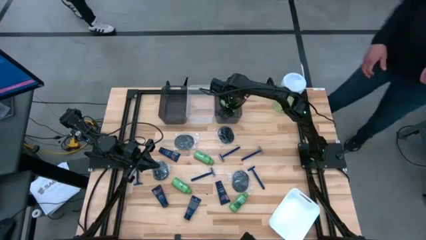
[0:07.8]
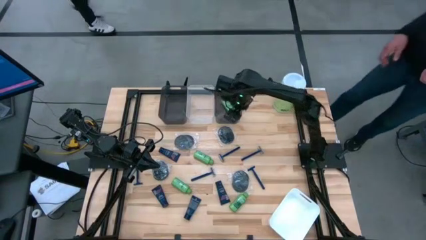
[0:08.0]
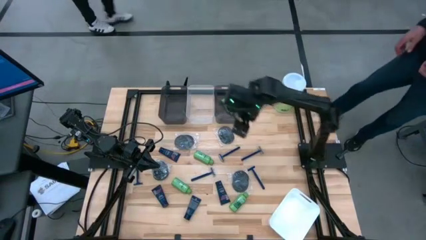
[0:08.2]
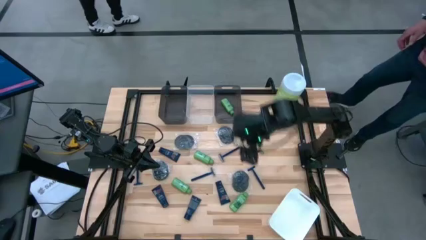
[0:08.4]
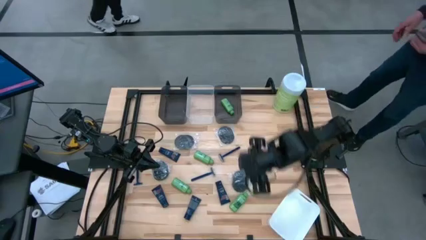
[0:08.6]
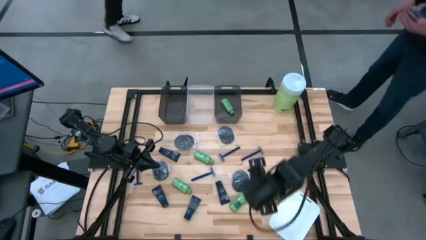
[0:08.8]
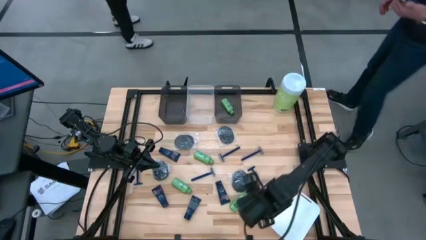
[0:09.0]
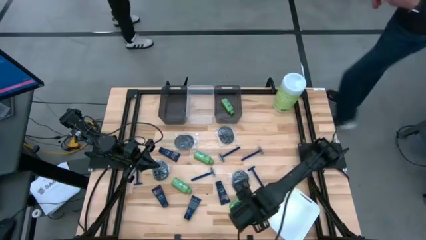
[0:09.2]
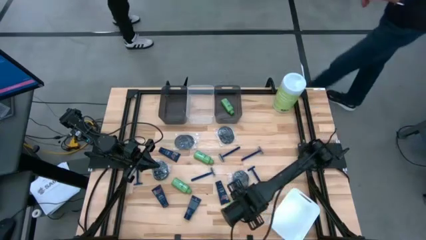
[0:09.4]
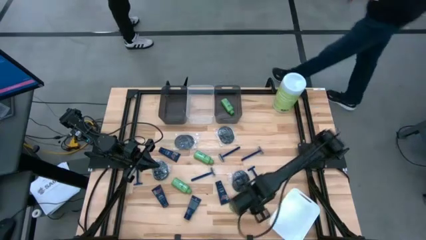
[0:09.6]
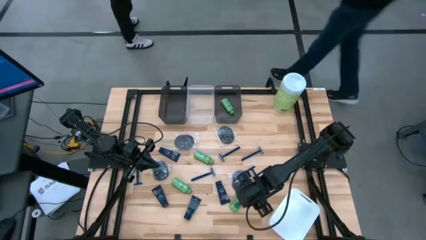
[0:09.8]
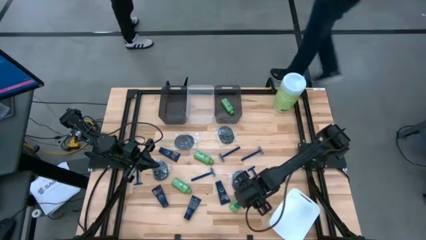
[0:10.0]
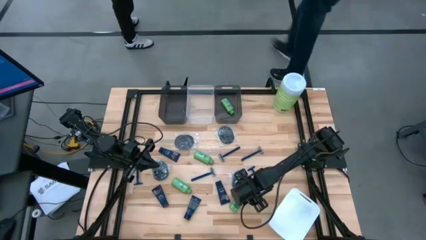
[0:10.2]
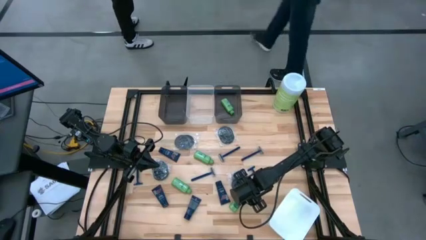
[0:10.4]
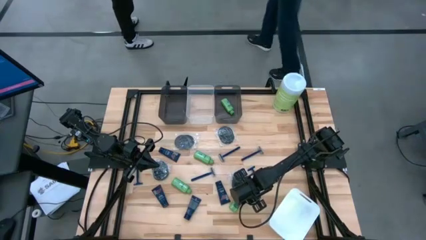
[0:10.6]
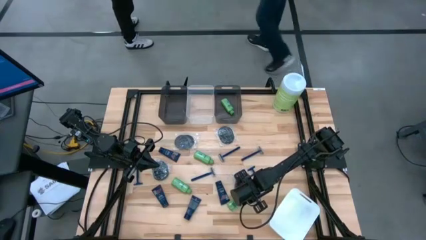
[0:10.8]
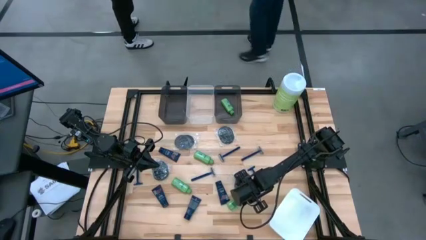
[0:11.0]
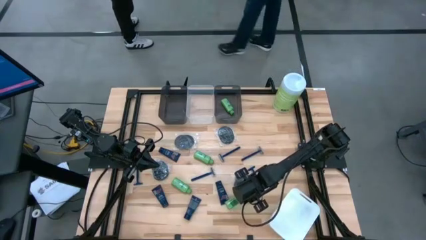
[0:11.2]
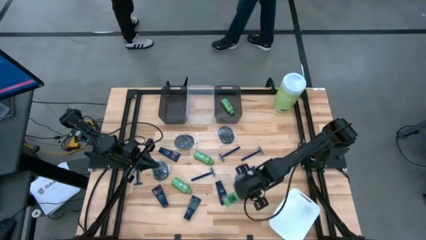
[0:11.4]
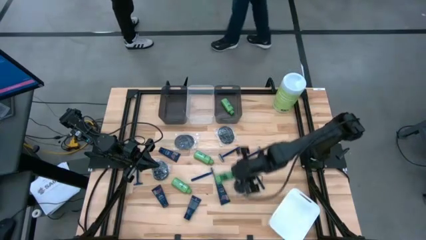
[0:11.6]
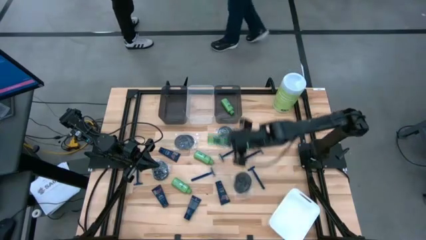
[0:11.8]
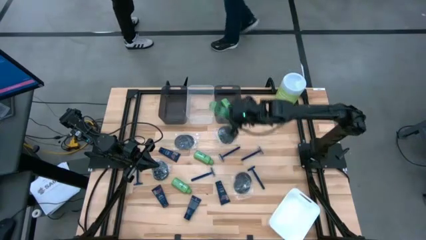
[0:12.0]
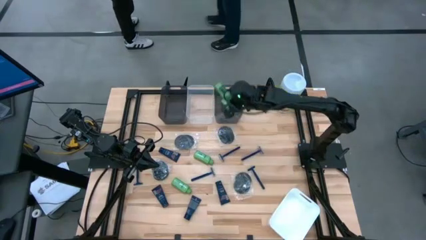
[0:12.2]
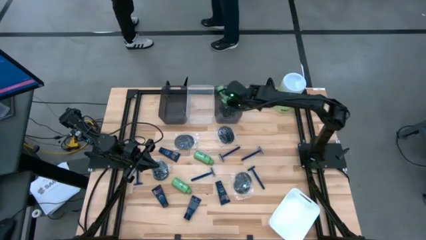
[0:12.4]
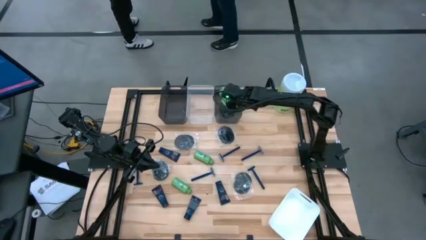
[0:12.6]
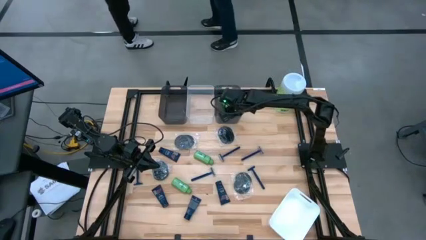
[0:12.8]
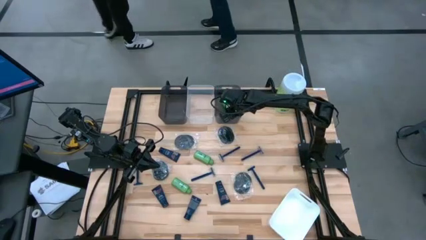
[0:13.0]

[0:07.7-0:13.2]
Task: Pick & Place Travel size toiletries
Put the green shampoo bottle into the right black bin

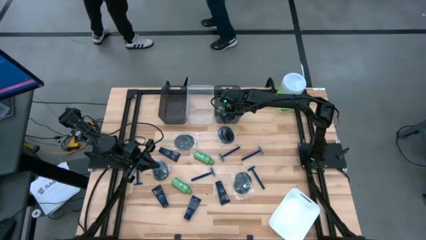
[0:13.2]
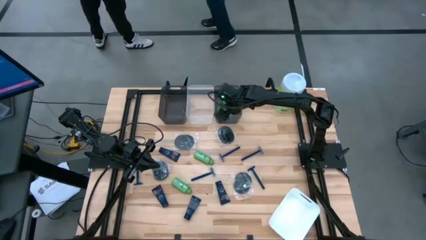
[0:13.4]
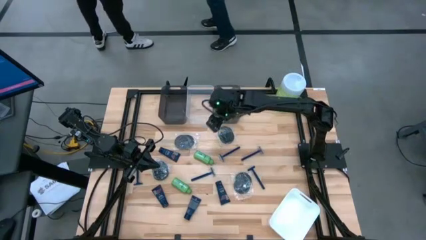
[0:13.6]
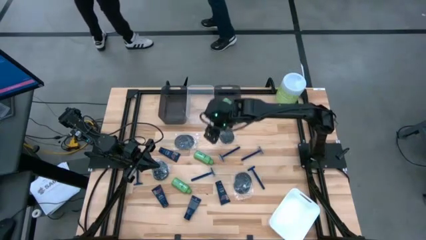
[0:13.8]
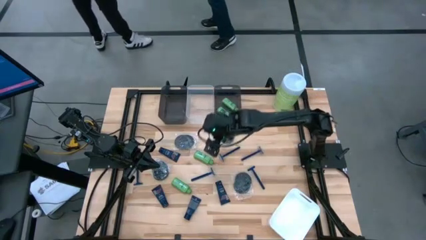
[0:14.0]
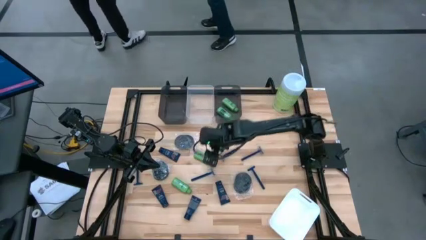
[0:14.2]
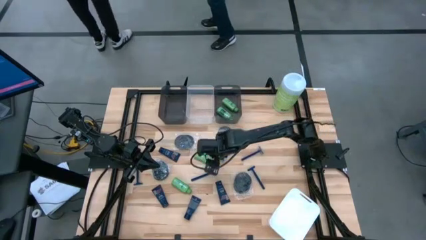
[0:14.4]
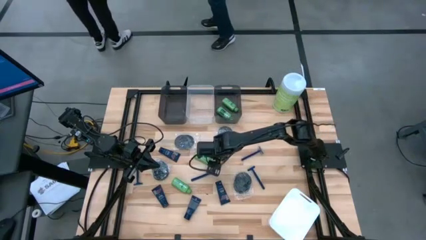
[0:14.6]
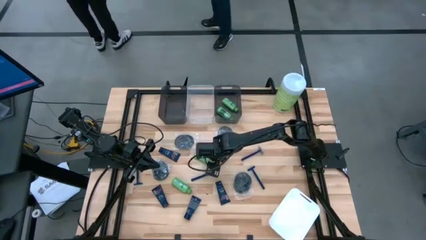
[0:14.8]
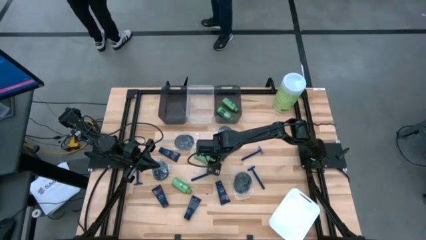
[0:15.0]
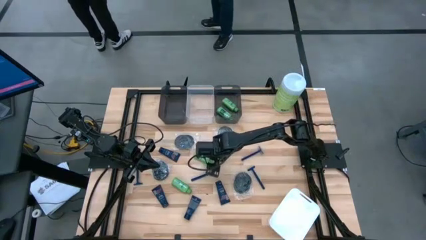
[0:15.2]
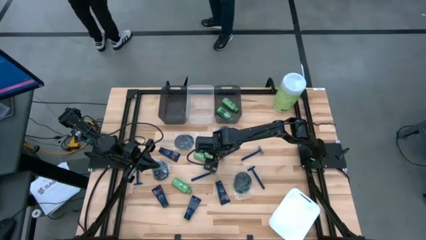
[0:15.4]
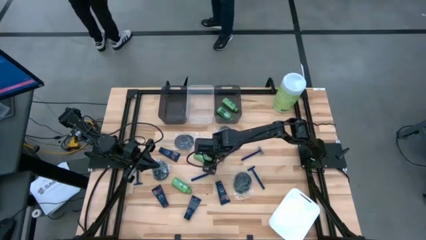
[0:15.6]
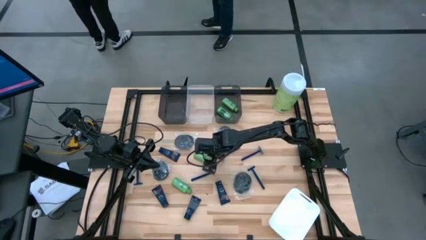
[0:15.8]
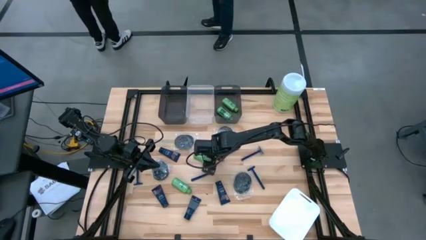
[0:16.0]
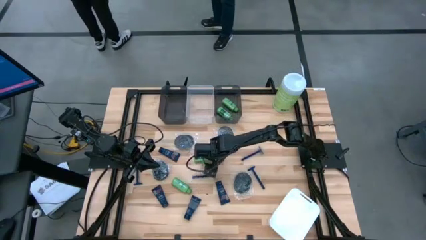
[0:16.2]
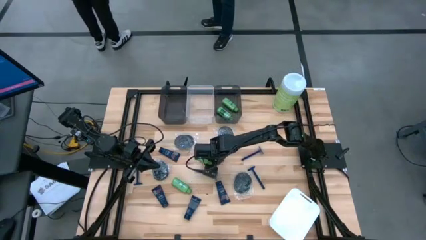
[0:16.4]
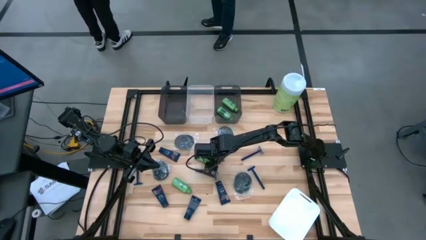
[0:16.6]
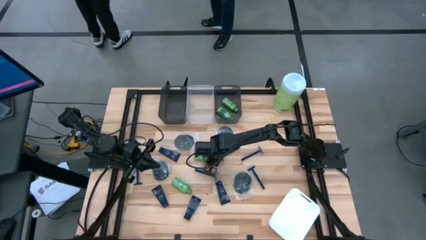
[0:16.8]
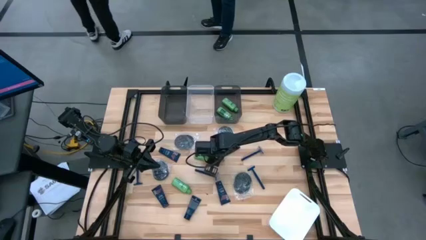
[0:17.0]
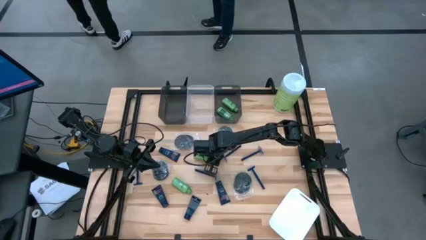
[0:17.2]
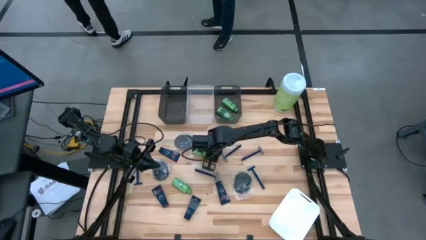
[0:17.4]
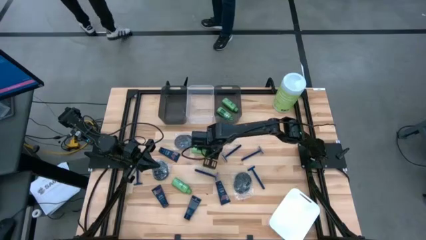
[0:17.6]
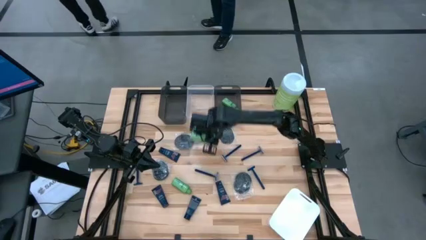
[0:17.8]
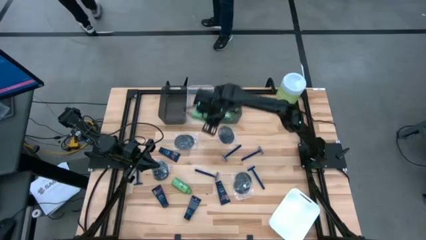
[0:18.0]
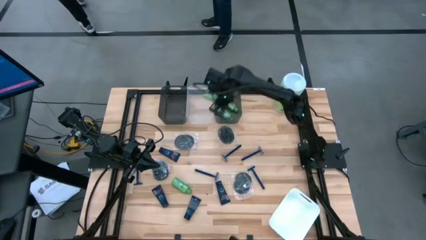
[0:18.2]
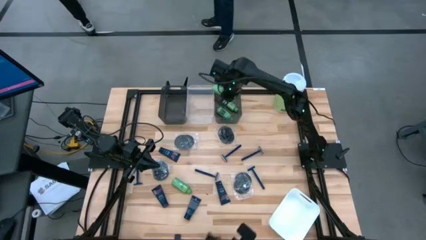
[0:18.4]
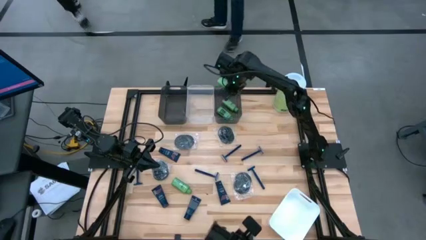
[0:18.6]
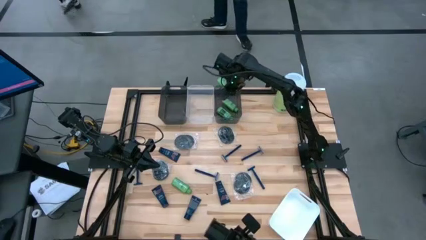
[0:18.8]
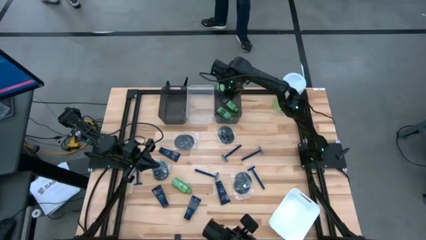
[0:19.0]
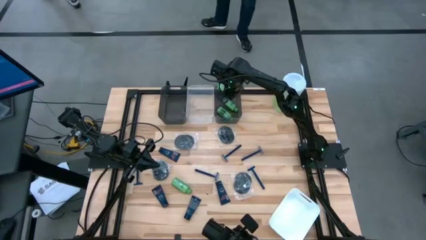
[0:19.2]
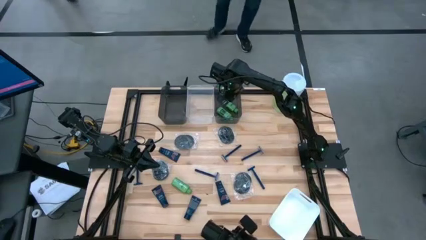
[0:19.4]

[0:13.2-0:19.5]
Put the green shampoo bottle into the right black bin

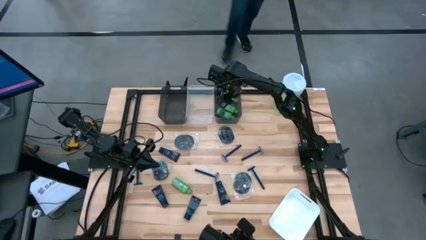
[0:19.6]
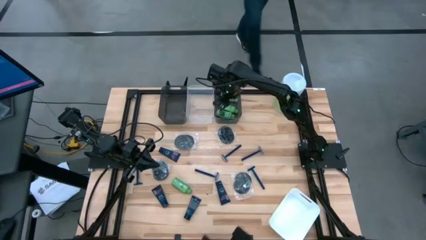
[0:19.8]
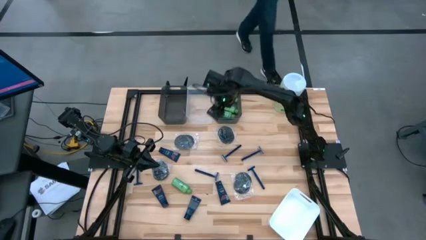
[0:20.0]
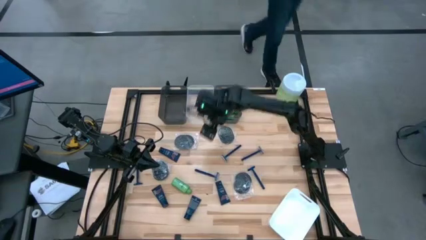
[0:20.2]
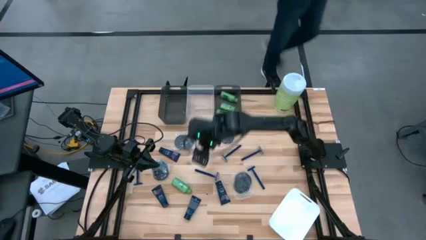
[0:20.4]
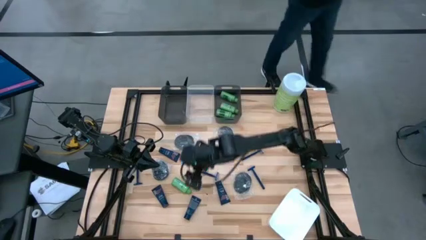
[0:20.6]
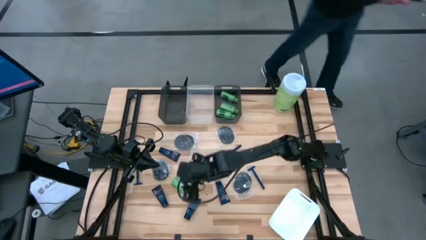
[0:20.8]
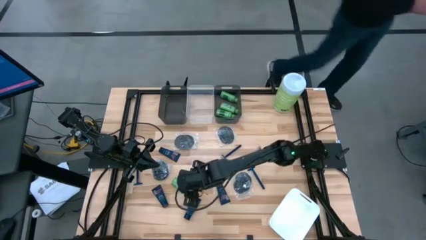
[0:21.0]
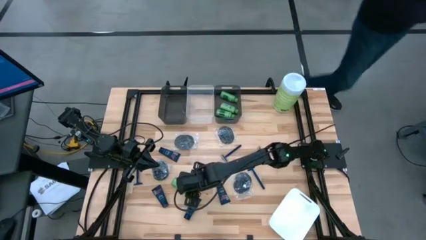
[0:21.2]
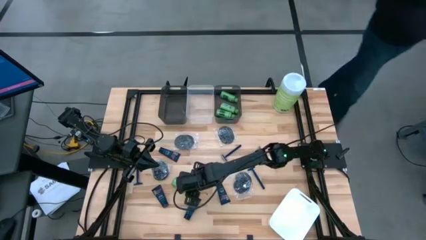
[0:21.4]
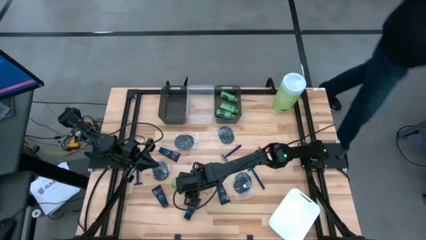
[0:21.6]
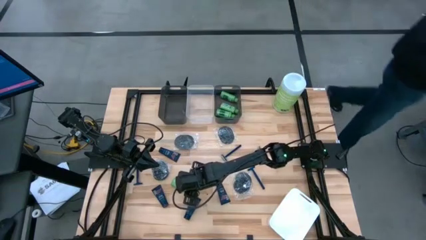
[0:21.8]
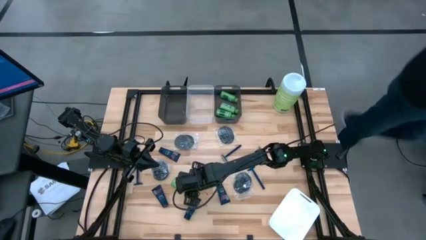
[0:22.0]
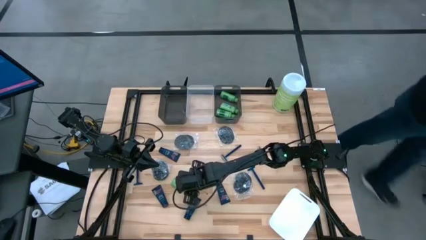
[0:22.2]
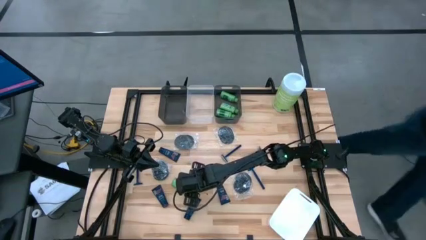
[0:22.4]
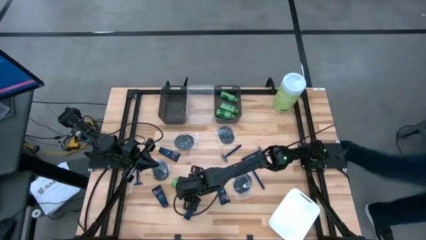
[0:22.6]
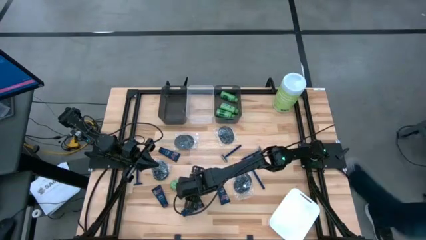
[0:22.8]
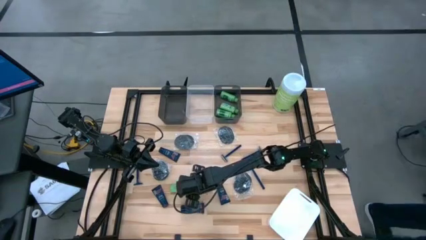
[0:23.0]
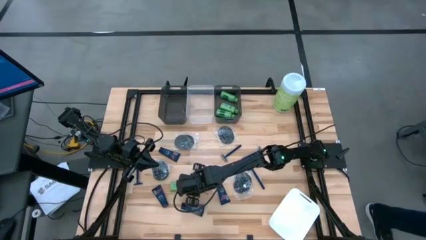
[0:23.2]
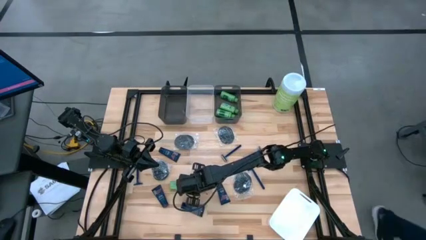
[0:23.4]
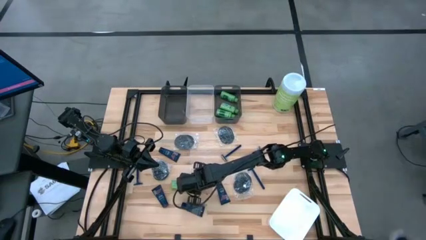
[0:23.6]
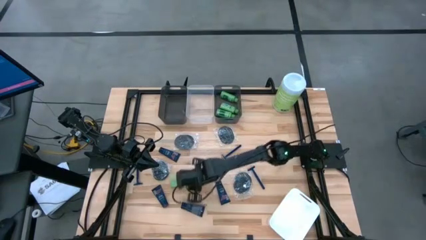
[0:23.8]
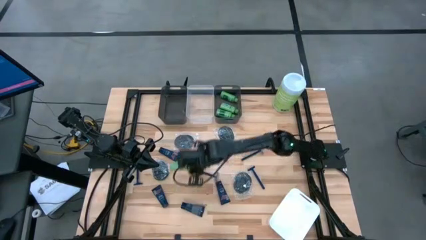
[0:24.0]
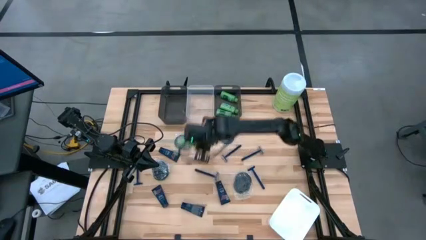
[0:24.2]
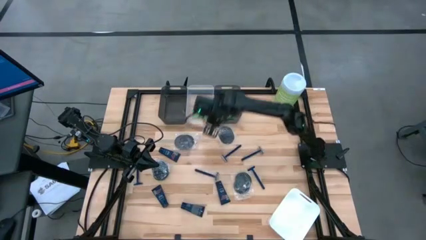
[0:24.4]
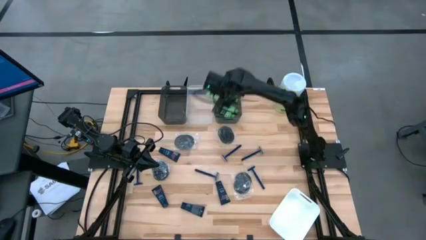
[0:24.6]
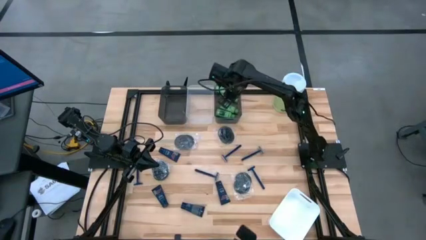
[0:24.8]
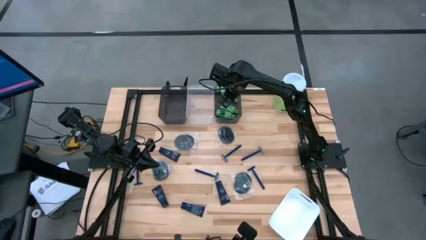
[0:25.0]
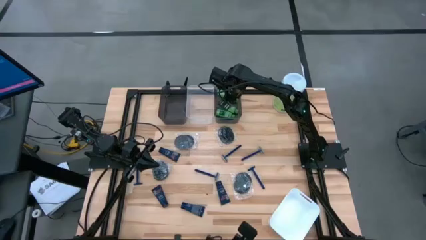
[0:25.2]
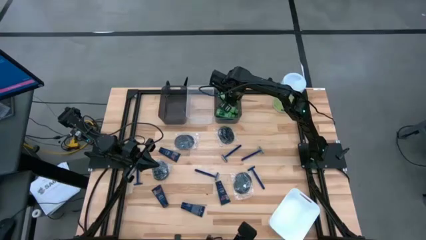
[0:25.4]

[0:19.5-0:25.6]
Put the green shampoo bottle into the right black bin
